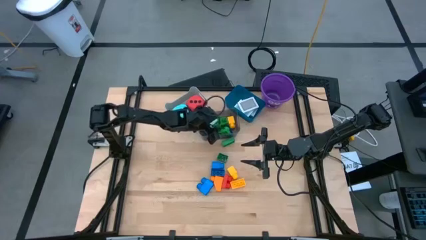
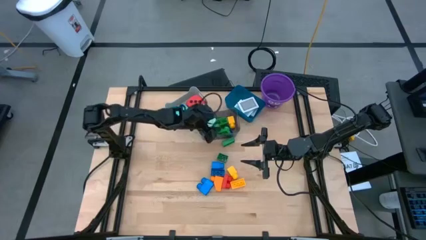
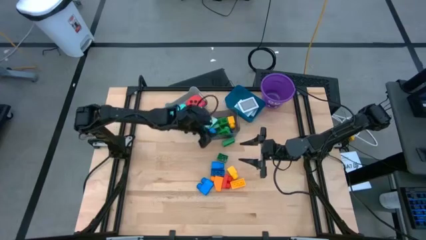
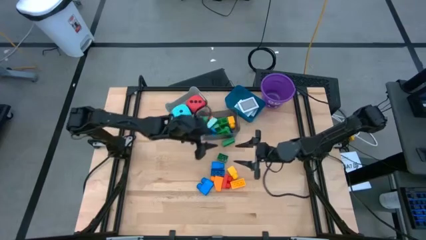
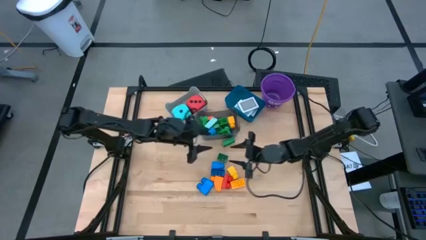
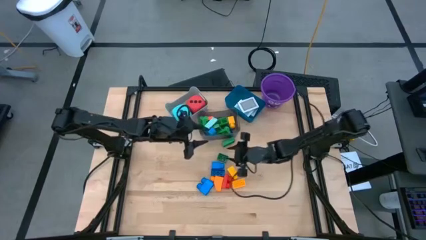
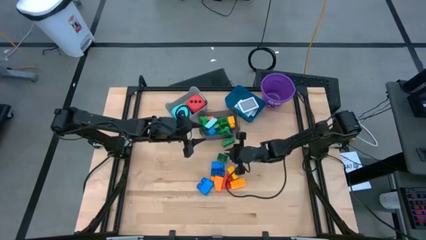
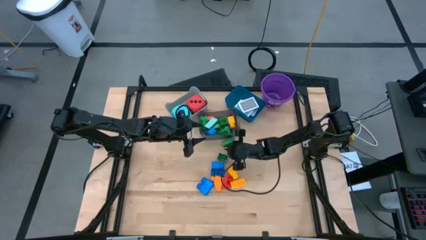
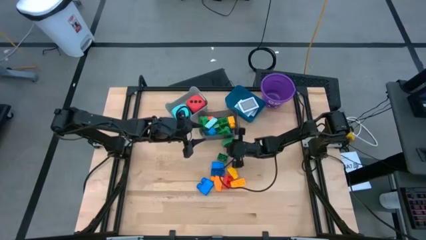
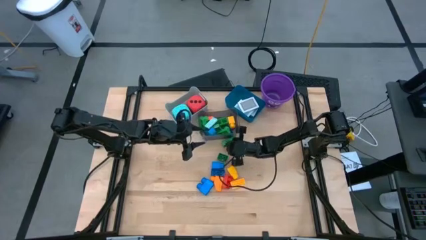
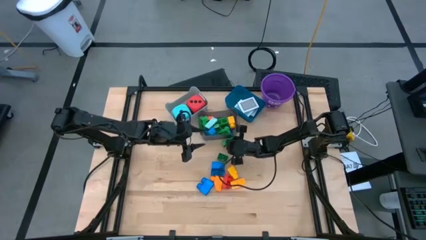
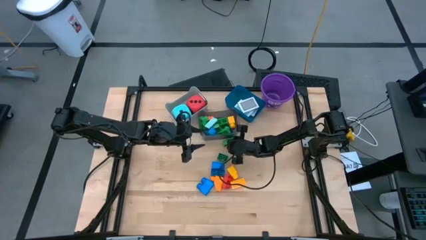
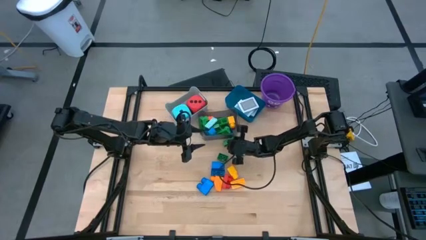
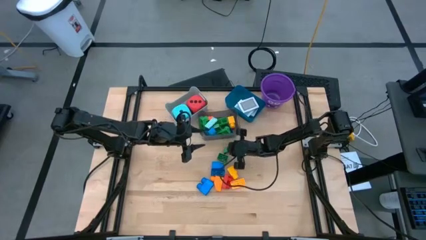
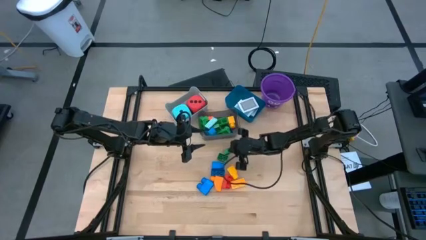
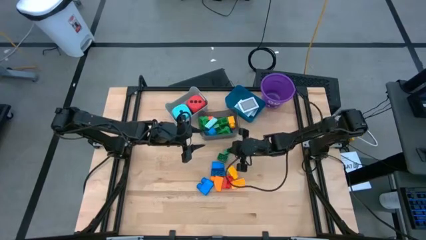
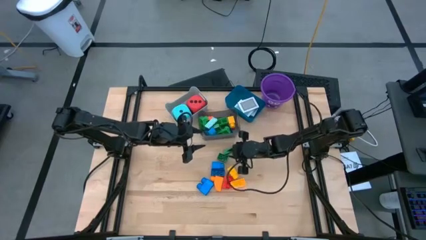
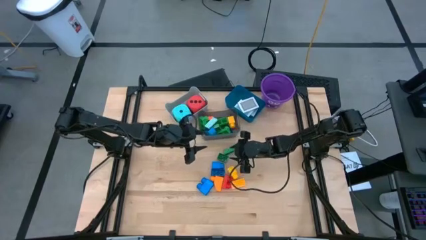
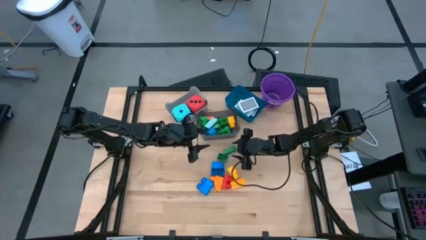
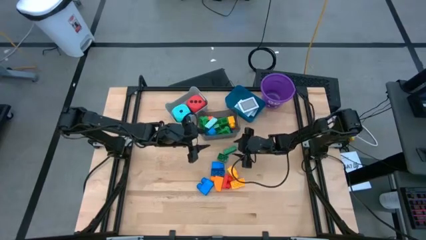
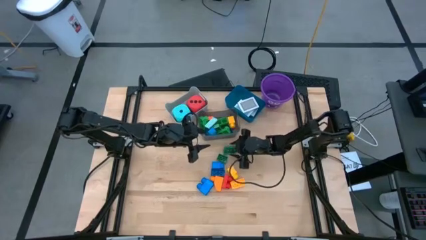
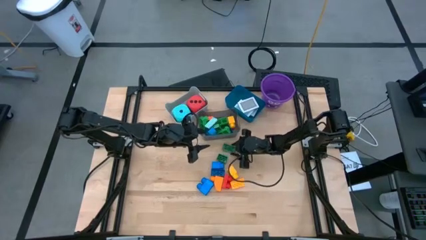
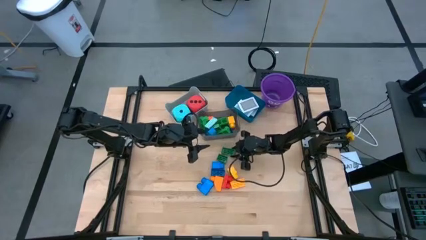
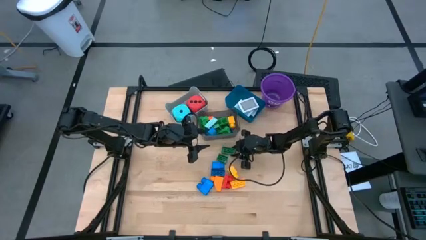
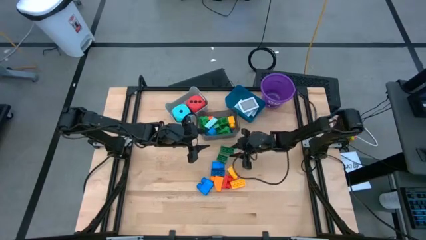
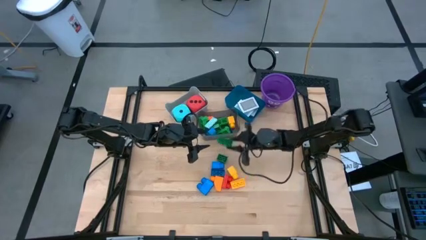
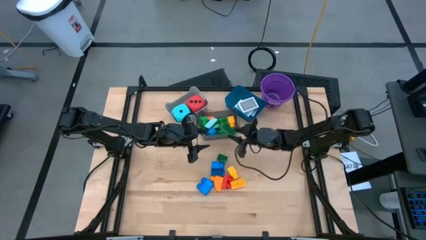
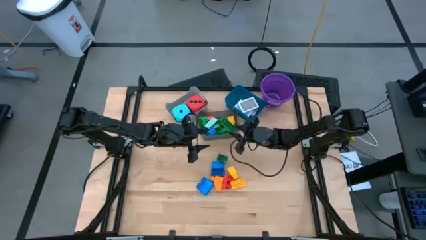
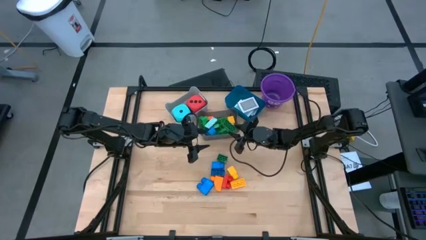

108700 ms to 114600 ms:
Task: Pick & Place Toys
Put the green block into the black bin

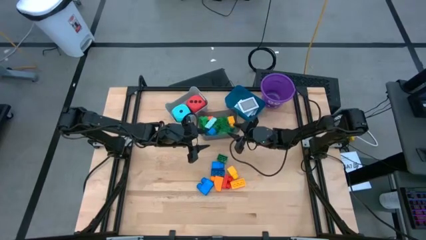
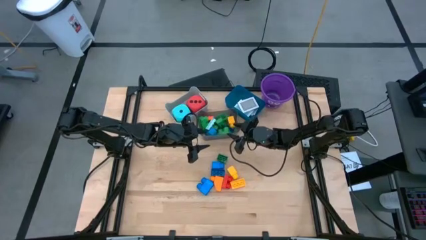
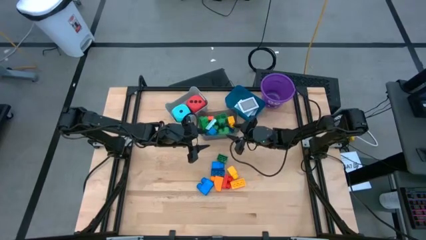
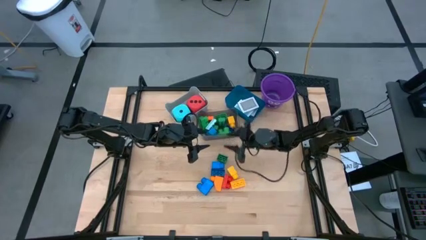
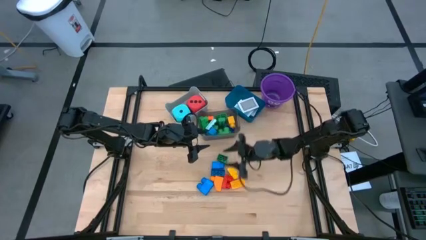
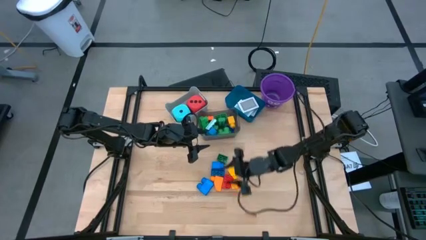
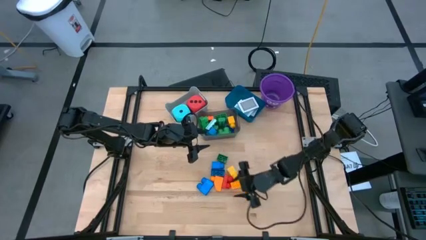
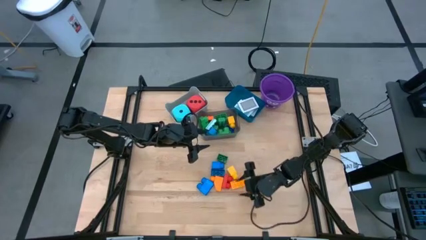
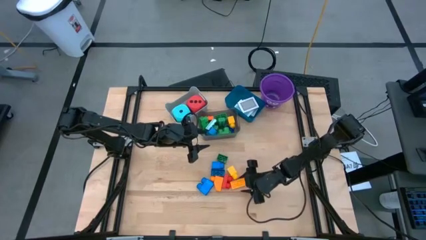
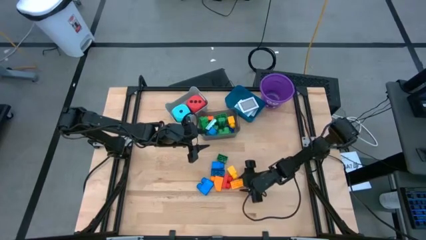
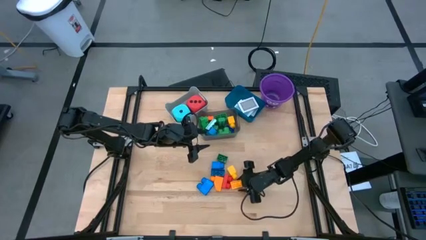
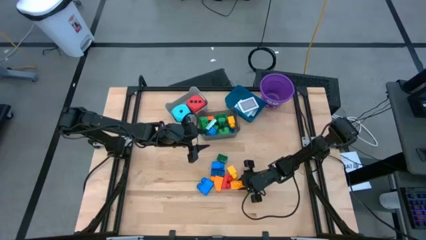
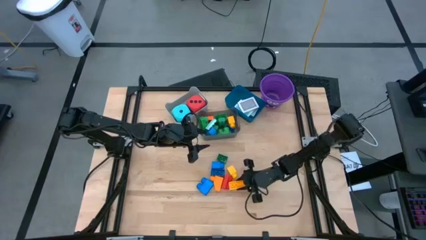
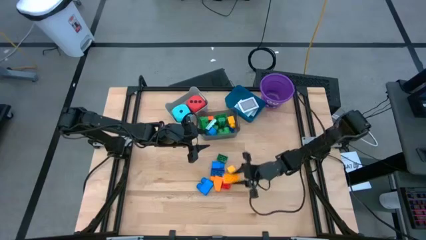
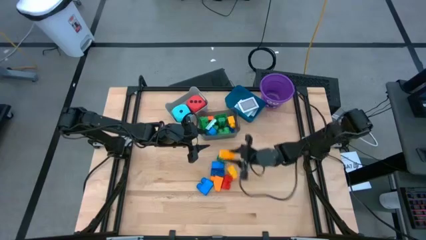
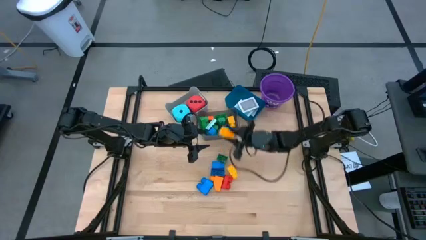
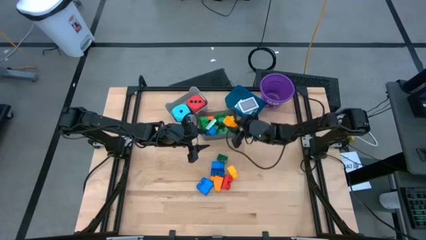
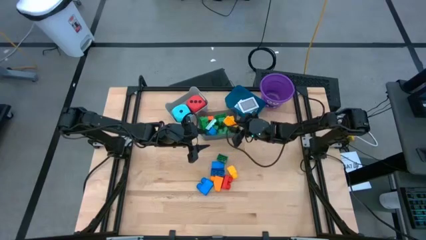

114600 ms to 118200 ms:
Put the yellow block into the black bin

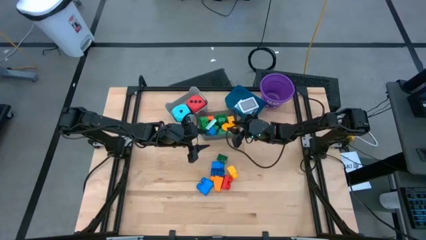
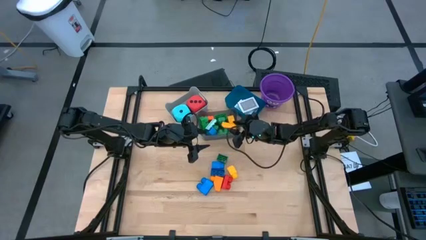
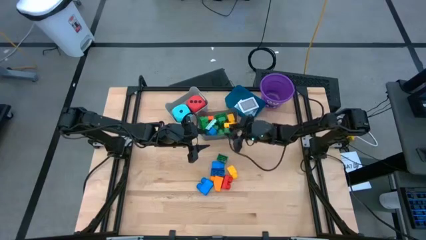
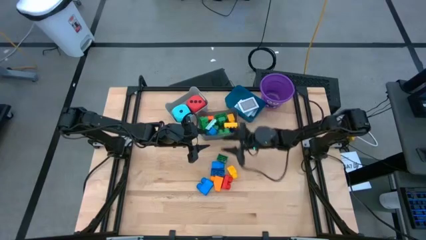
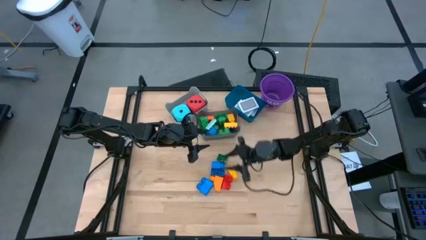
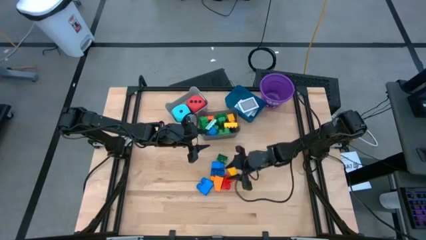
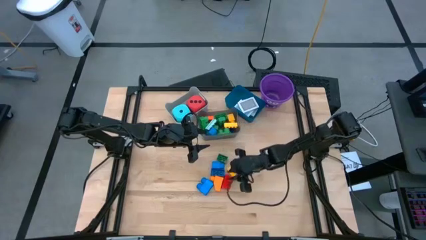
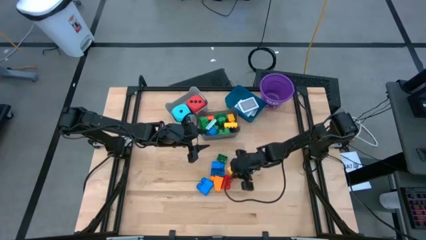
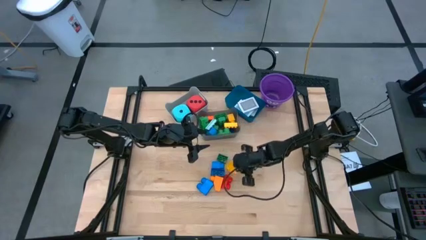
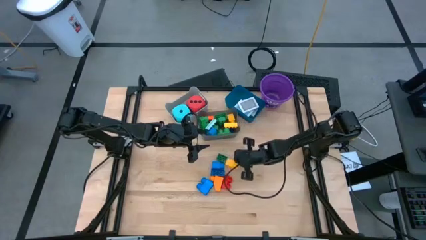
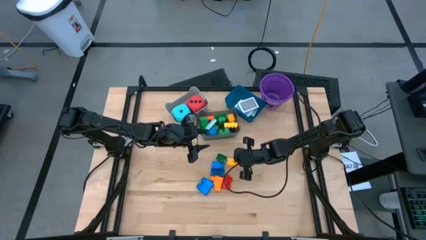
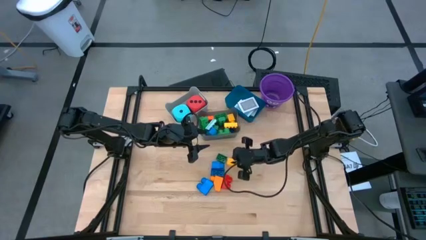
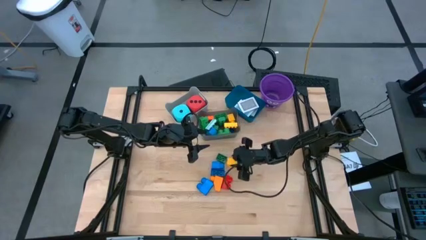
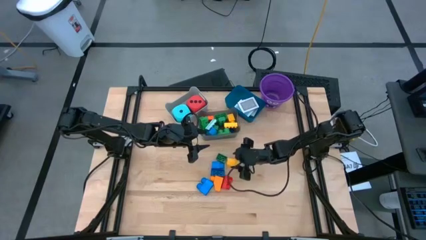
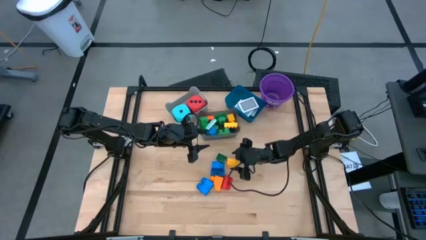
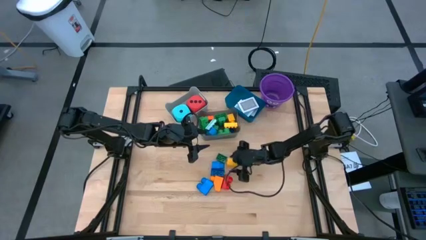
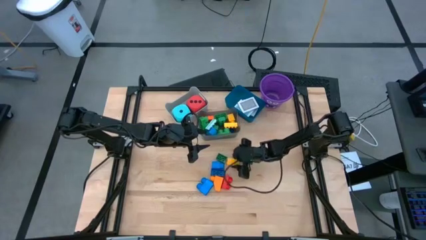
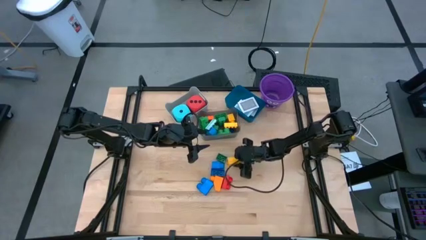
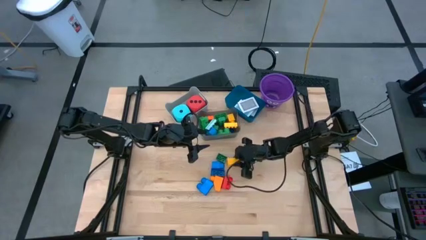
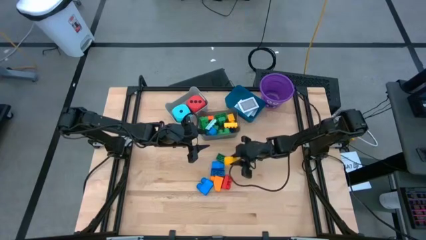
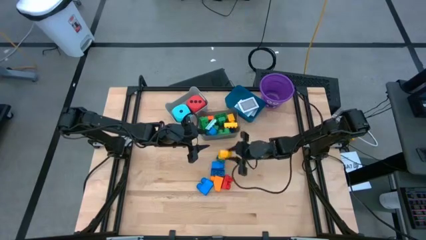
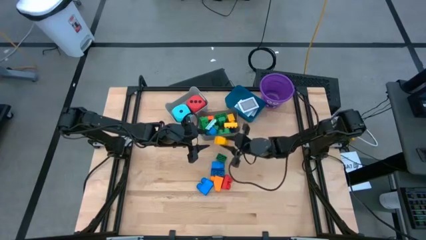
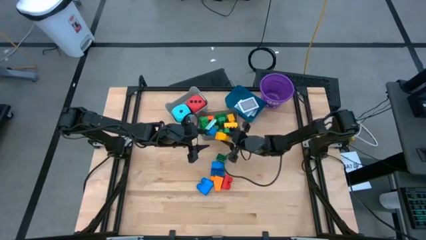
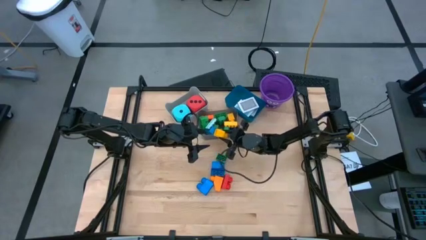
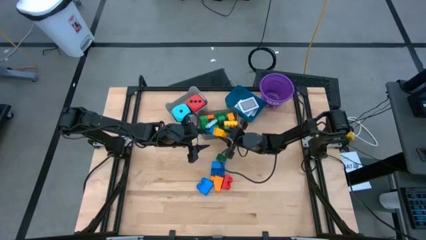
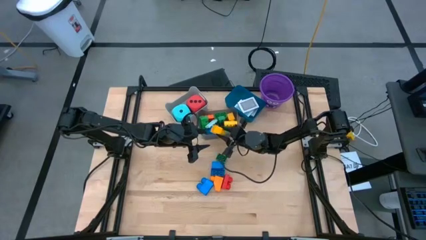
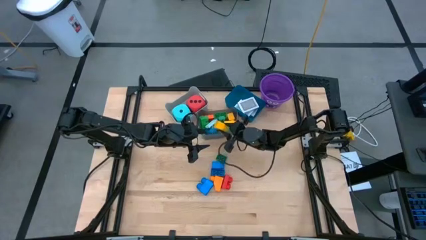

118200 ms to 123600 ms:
Put the yellow block into the black bin

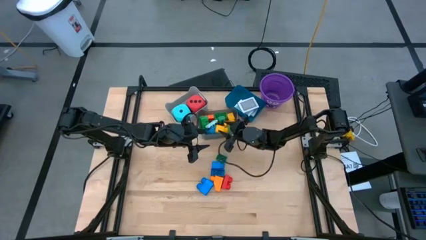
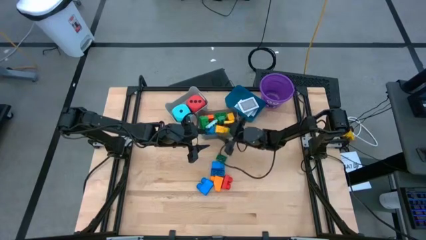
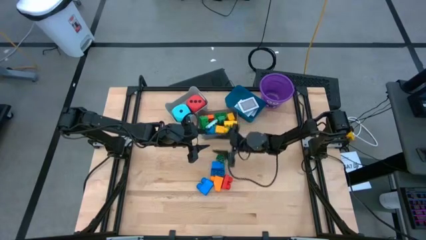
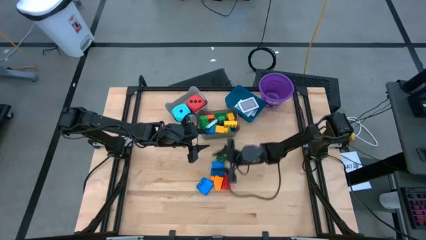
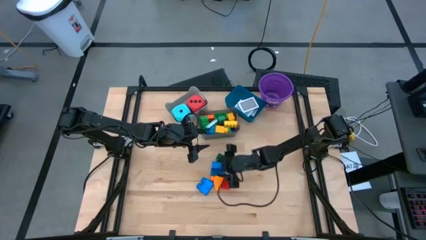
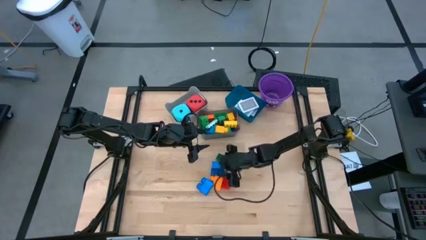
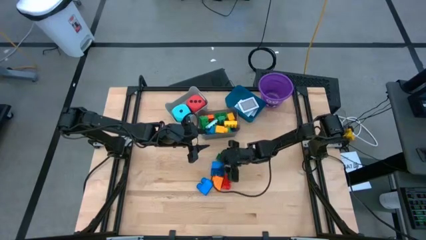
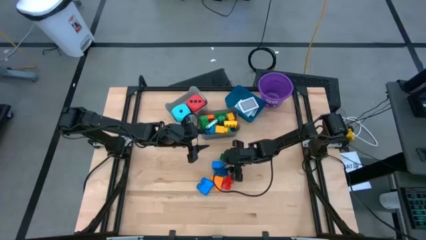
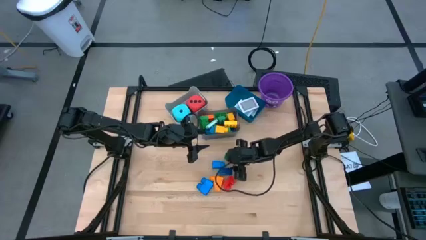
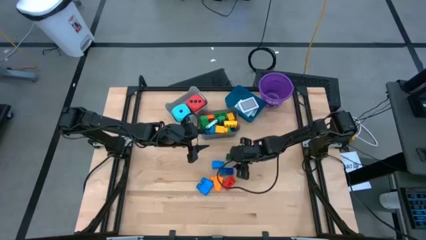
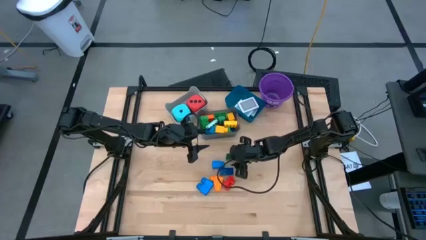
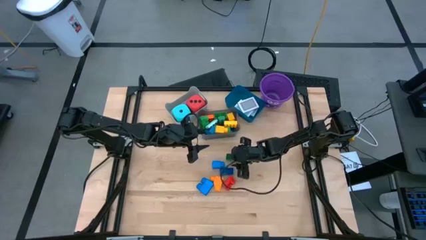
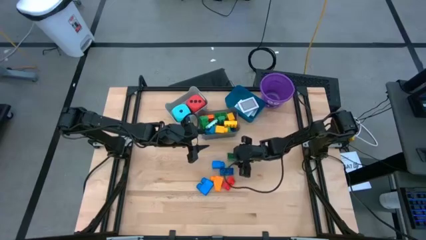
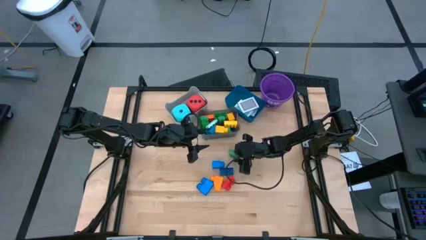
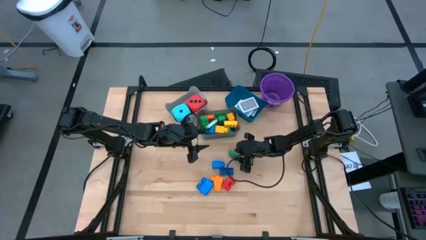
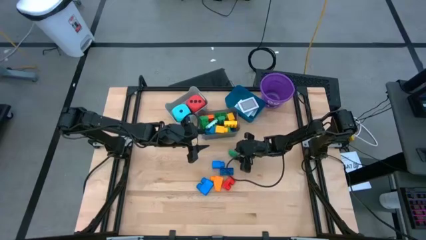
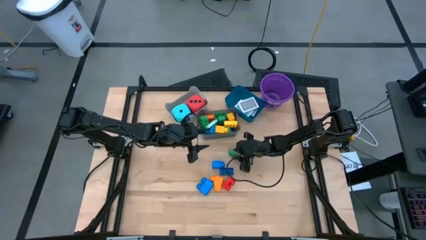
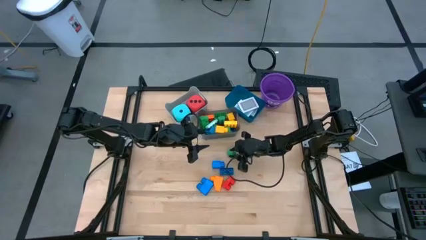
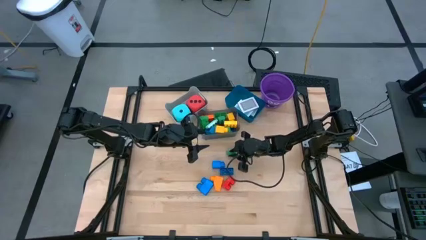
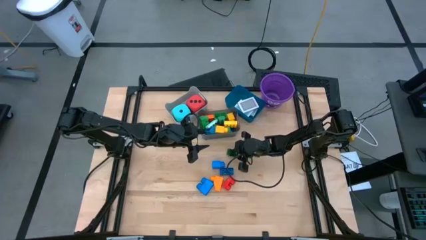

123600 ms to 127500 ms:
Put the green block into the black bin
